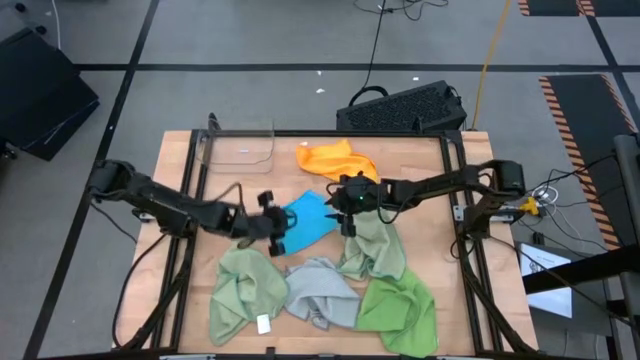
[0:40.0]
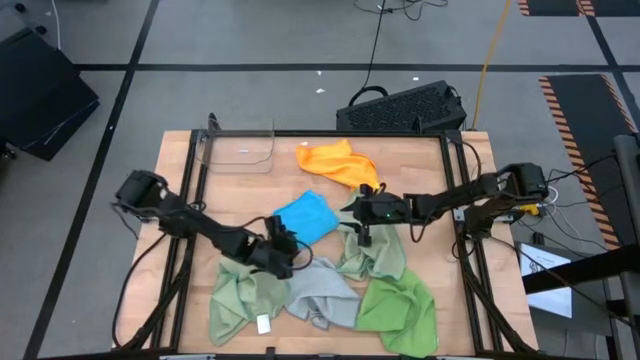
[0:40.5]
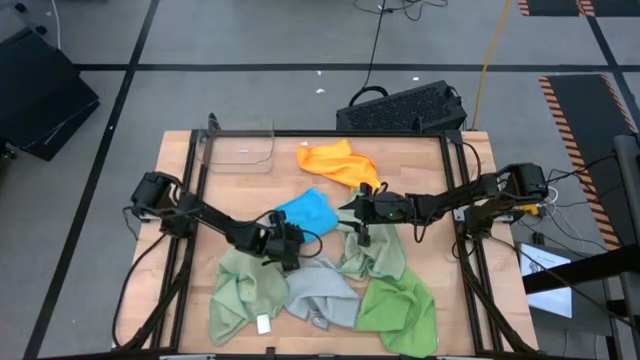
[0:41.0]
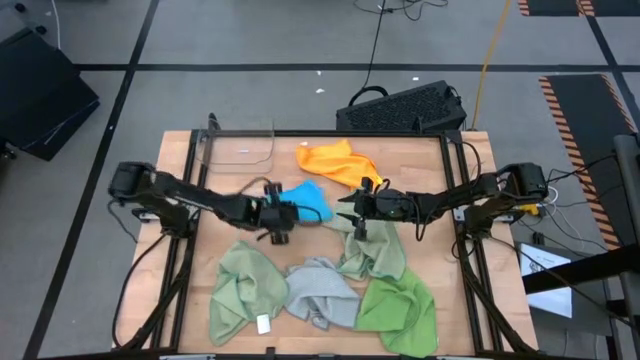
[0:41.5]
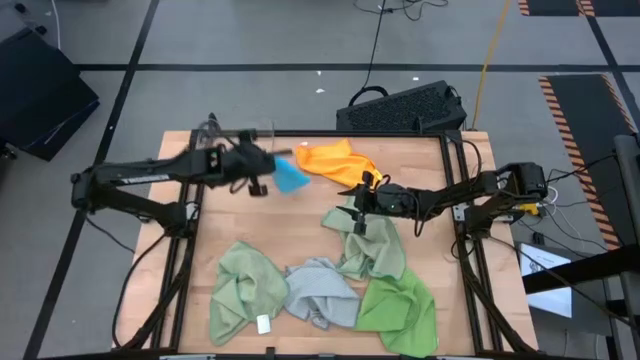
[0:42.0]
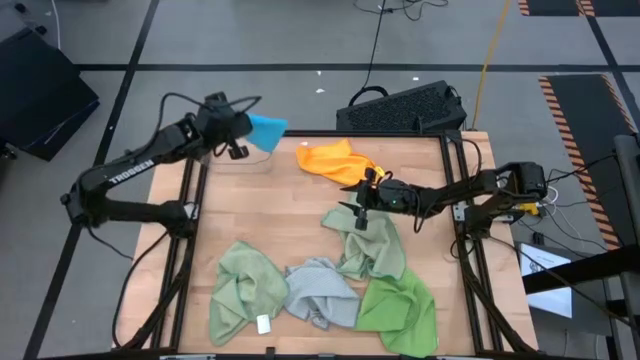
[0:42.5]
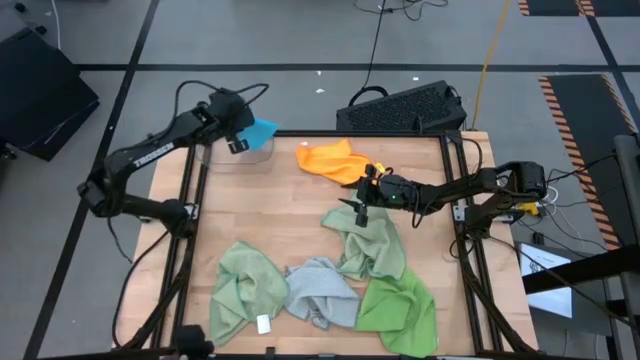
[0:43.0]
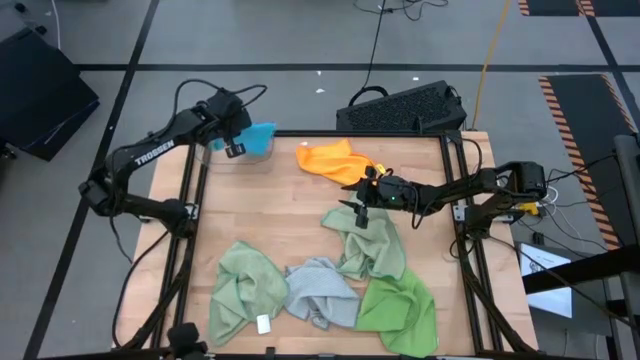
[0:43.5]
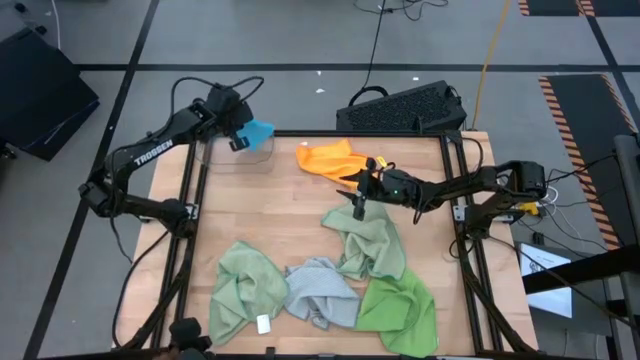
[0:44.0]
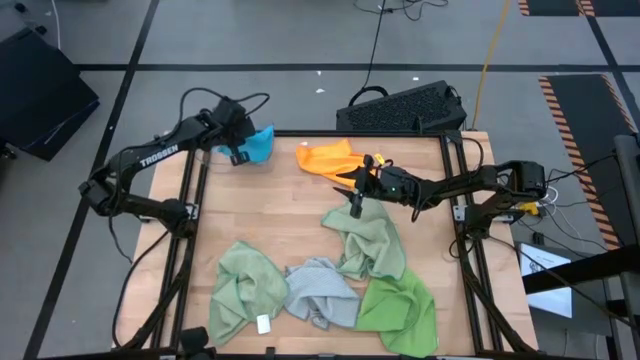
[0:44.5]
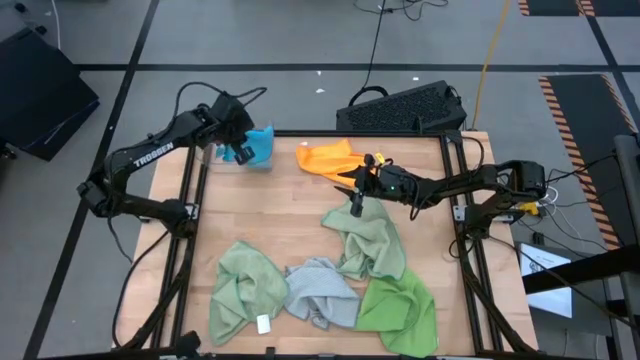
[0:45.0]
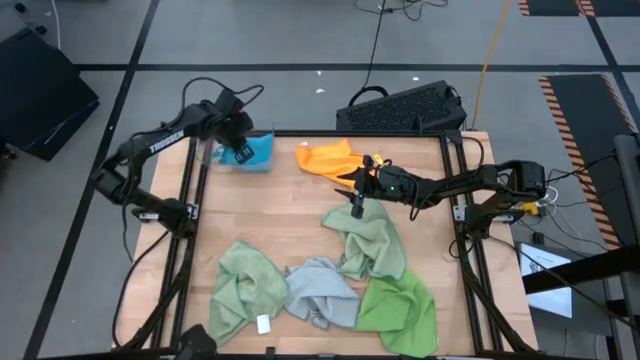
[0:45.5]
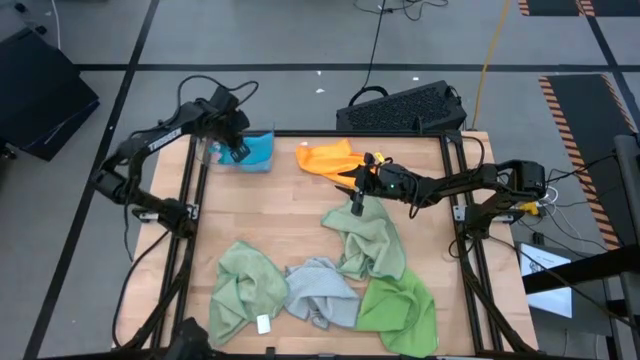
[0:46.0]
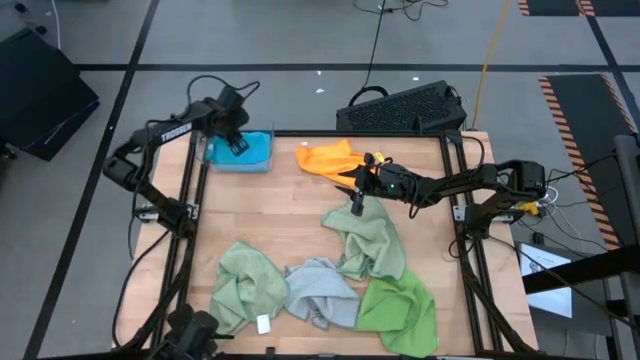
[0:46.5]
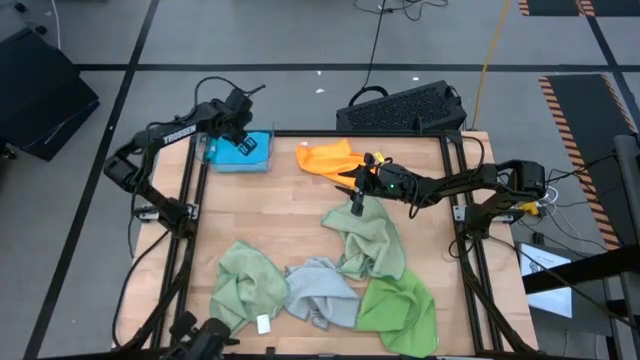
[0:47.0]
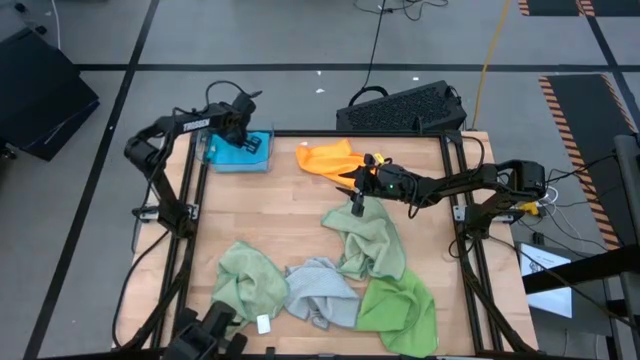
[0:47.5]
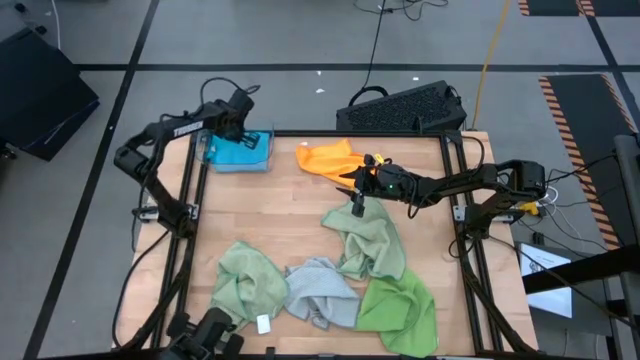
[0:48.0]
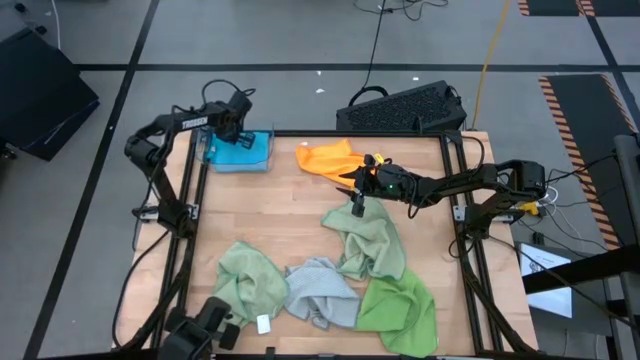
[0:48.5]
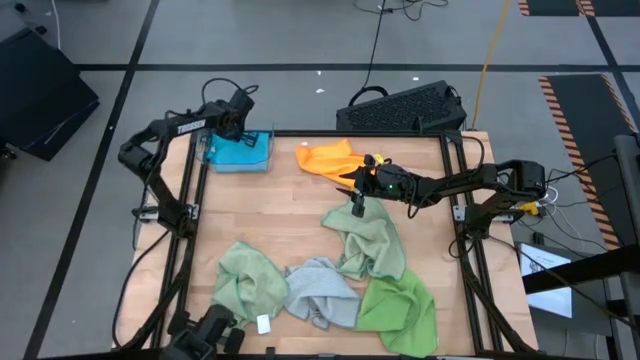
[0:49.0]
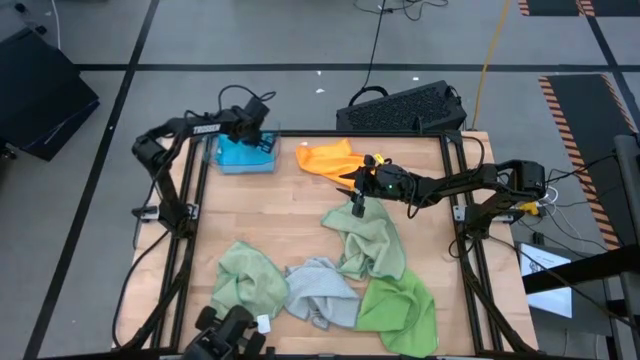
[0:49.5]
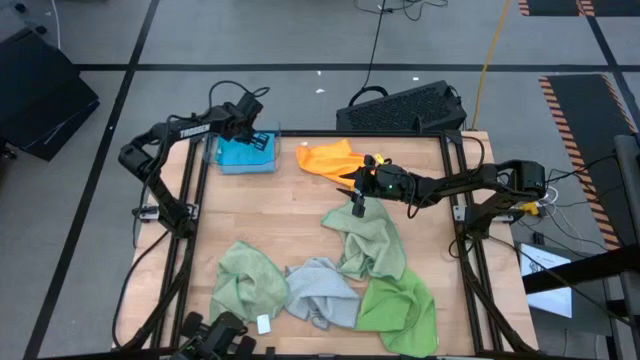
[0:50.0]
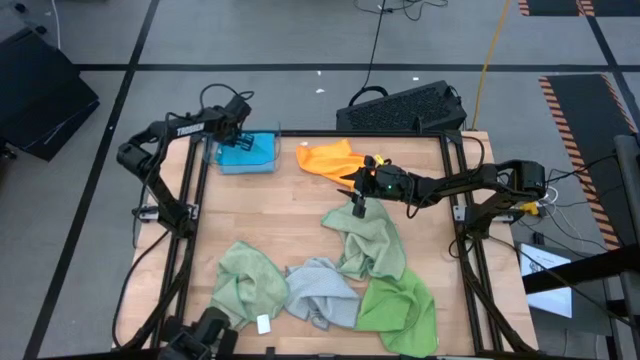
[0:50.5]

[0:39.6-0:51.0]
Task: Fold microfiber towels
Put the blue microfiber cloth into the transparent bin

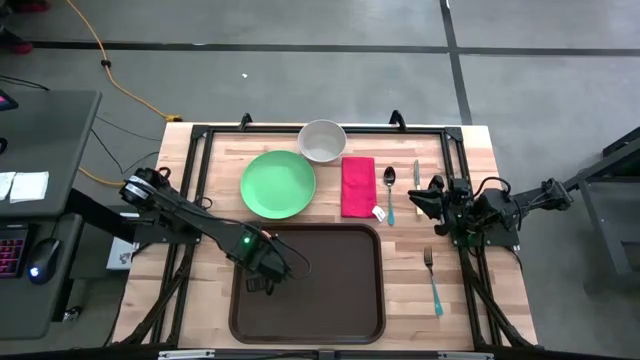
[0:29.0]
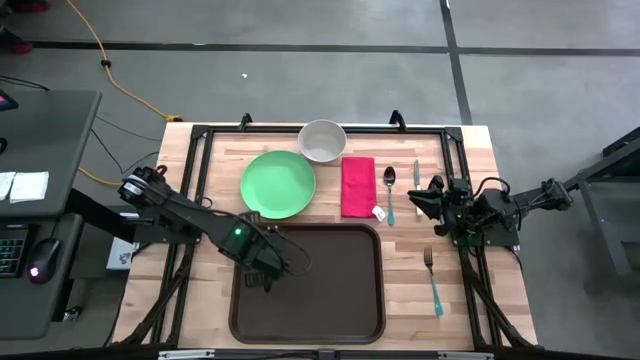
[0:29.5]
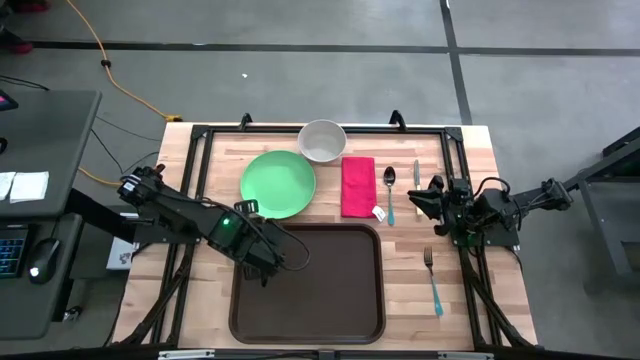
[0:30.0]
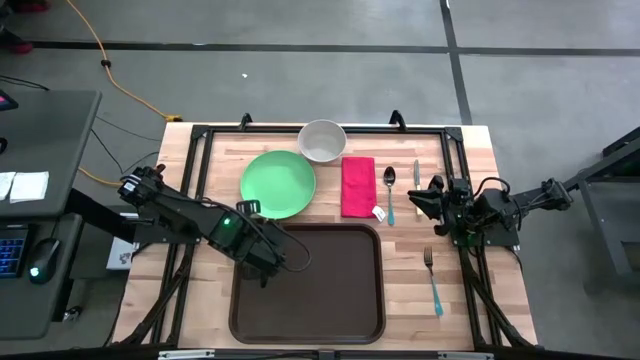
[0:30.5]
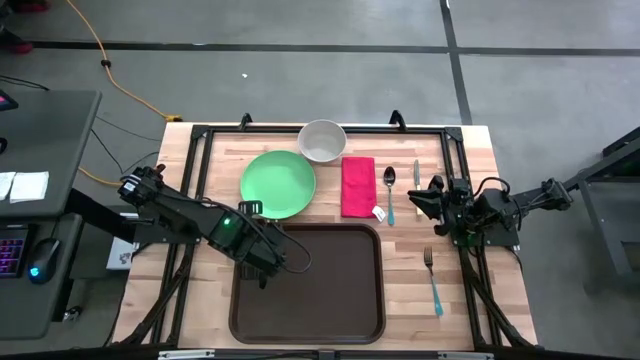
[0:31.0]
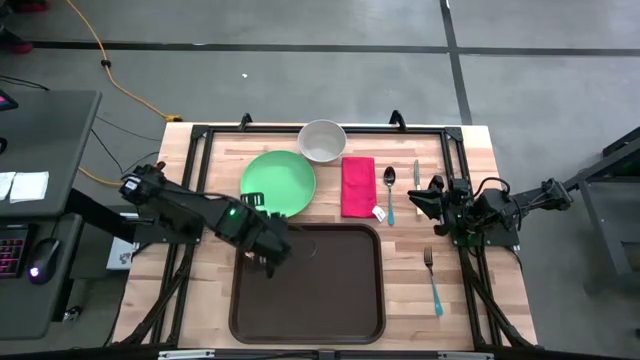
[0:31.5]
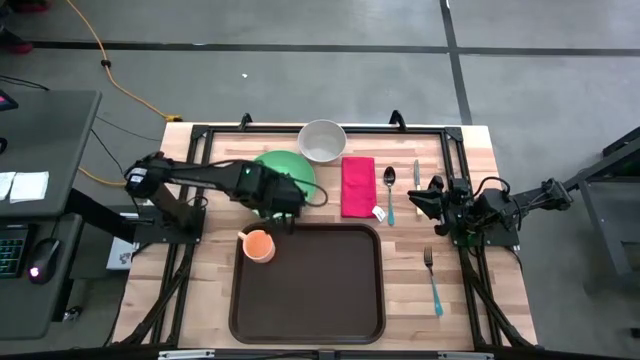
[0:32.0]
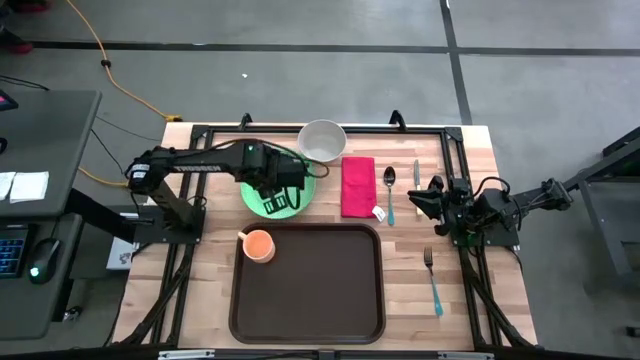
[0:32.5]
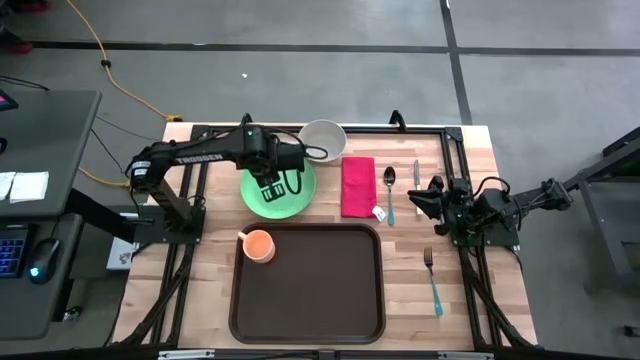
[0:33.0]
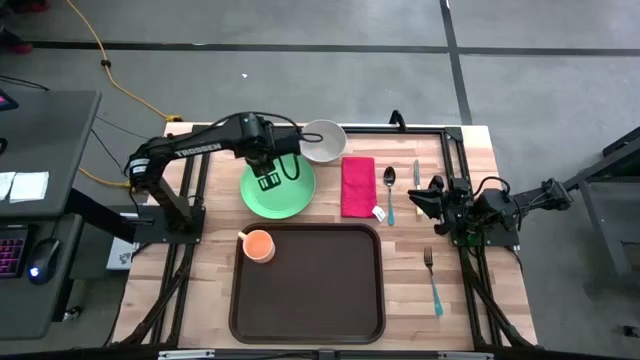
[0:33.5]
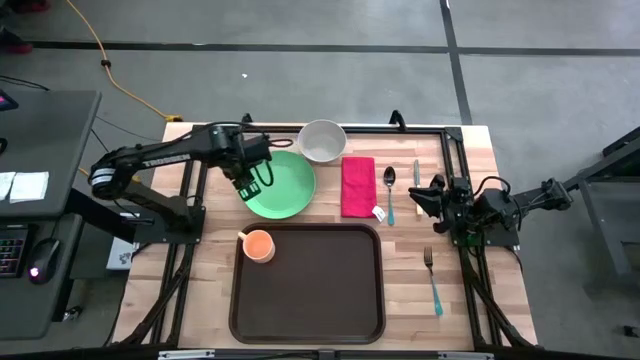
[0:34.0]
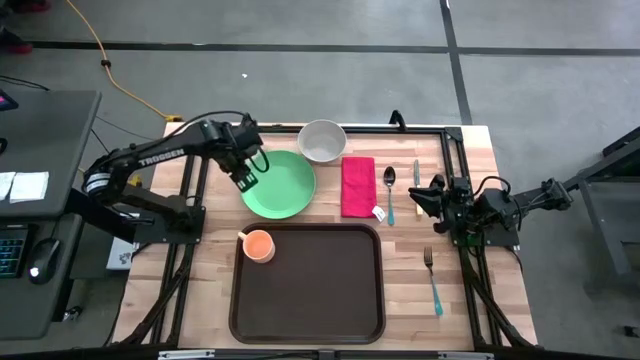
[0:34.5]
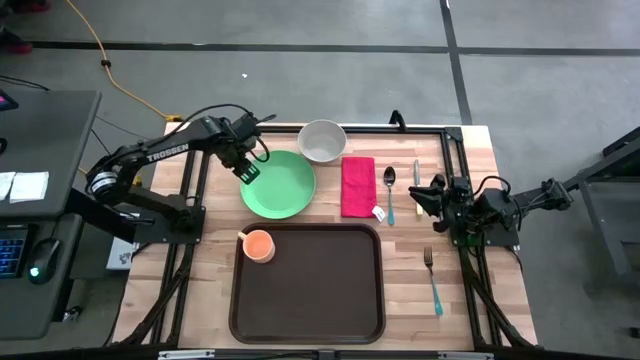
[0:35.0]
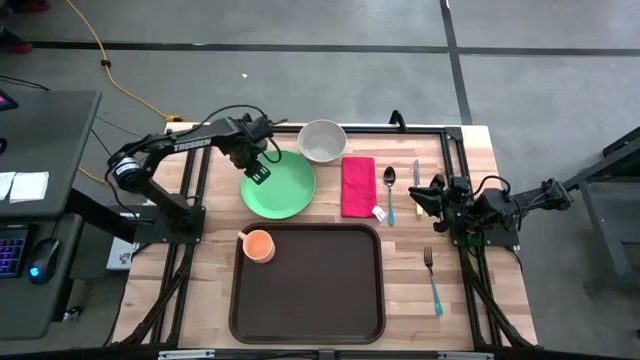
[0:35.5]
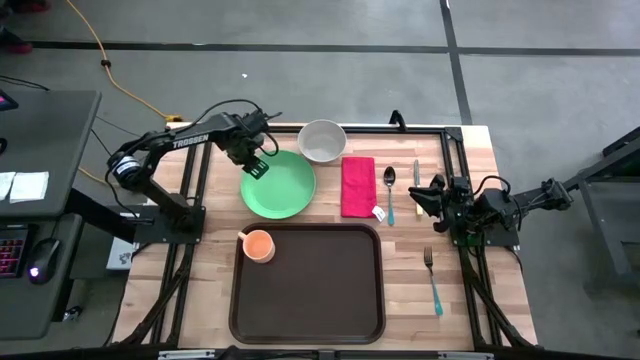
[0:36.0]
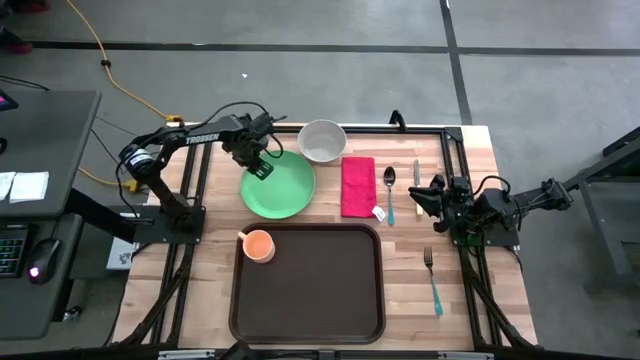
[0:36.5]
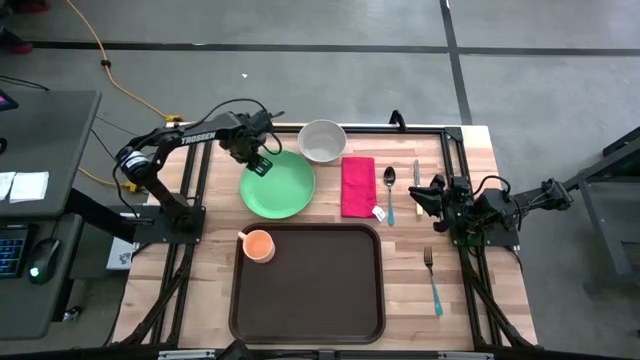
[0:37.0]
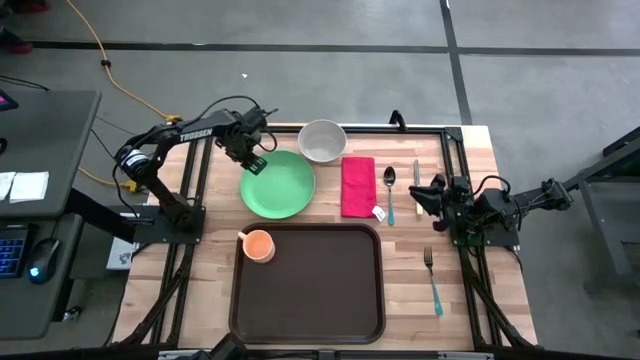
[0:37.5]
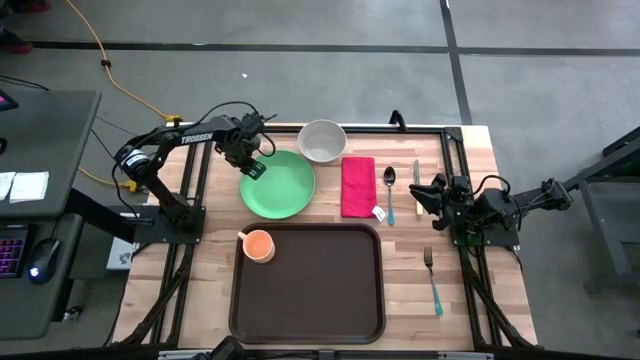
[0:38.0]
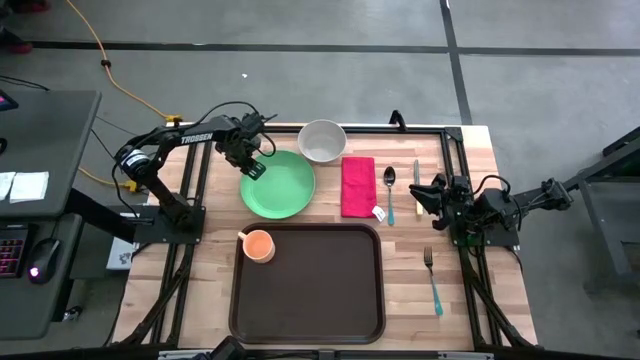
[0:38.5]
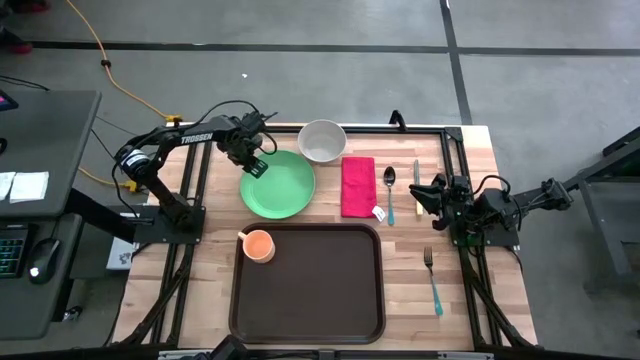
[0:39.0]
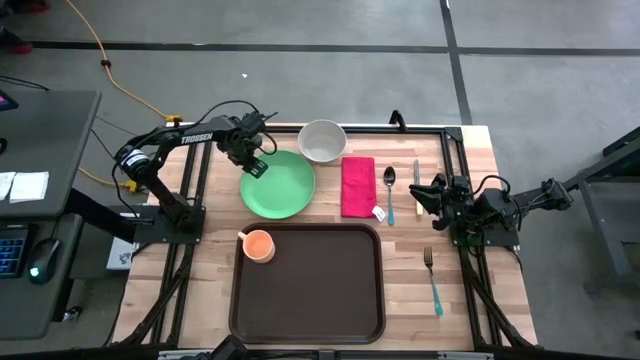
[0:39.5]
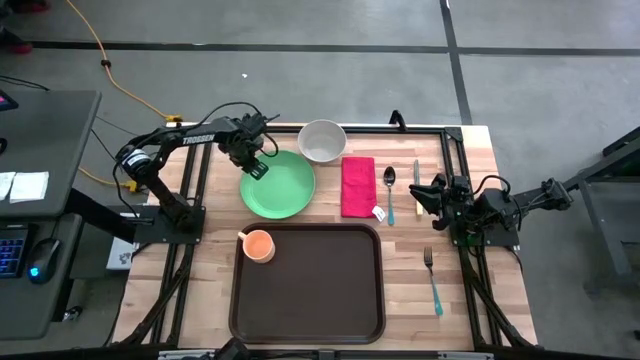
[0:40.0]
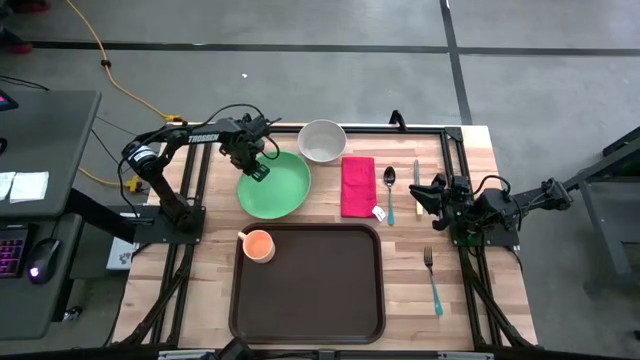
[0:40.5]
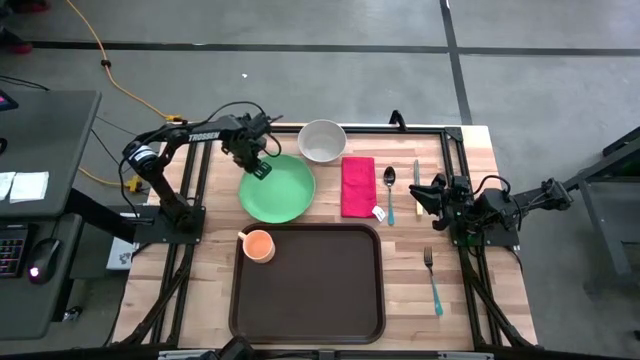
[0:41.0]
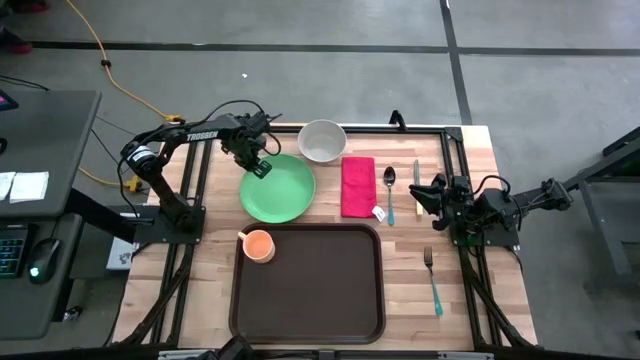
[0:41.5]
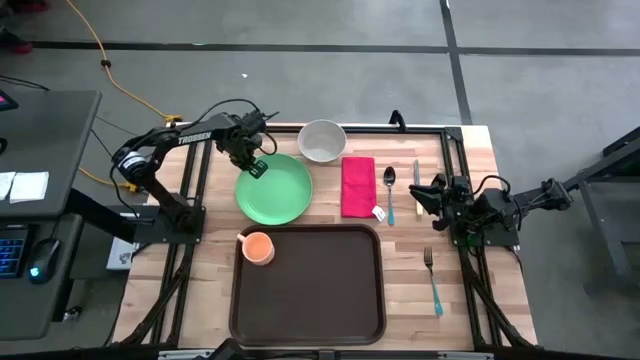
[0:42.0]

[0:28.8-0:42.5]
Task: Set up tray
Put the green plate on the brown serving tray
